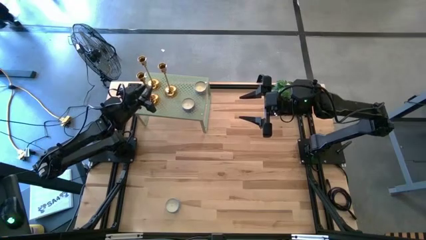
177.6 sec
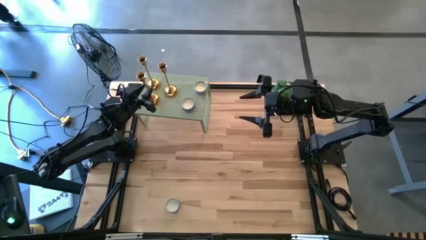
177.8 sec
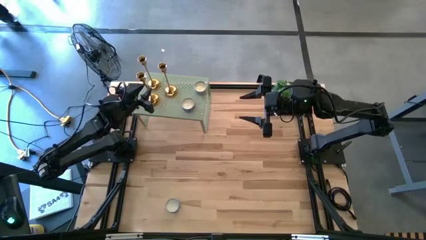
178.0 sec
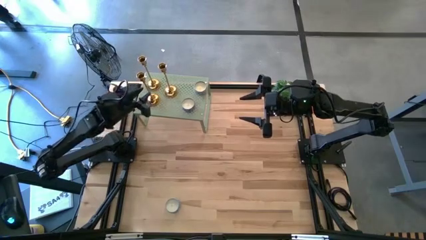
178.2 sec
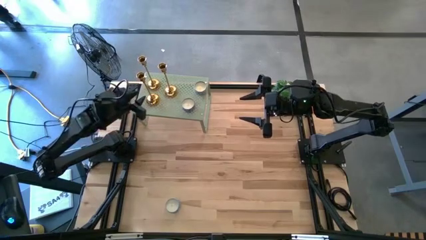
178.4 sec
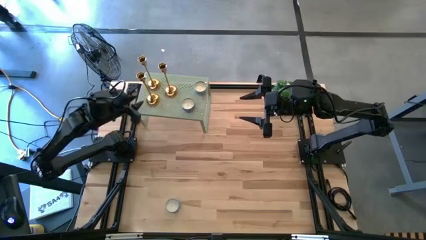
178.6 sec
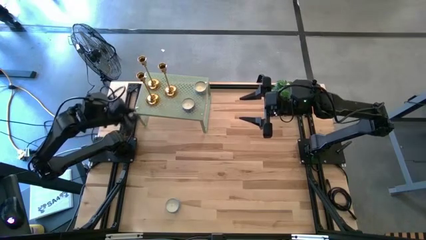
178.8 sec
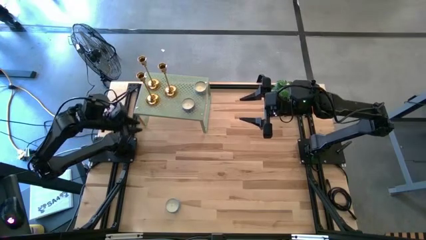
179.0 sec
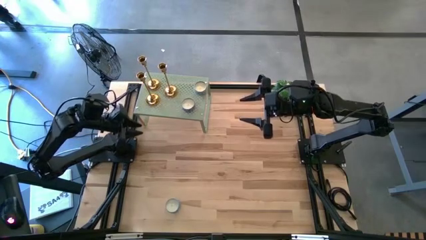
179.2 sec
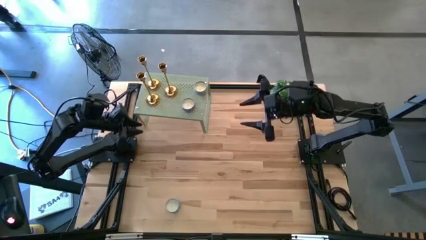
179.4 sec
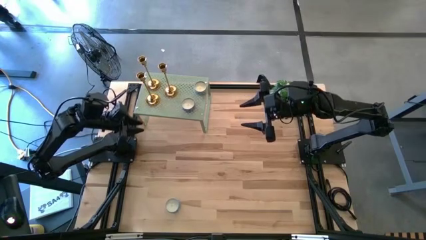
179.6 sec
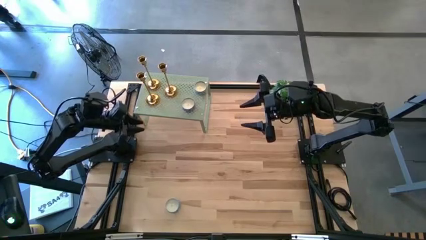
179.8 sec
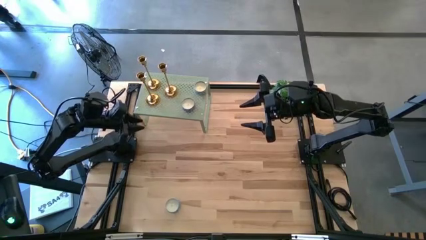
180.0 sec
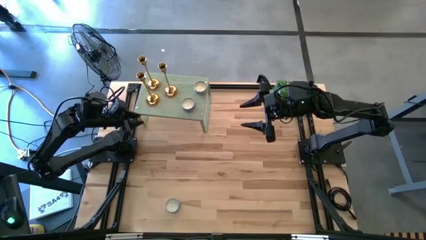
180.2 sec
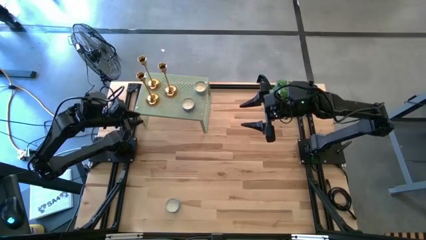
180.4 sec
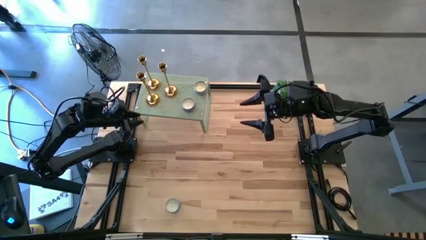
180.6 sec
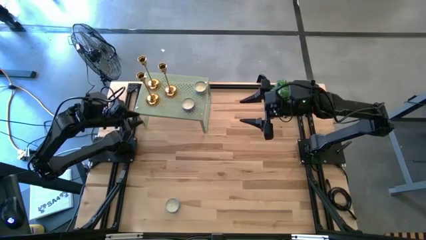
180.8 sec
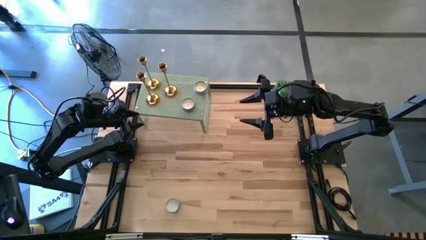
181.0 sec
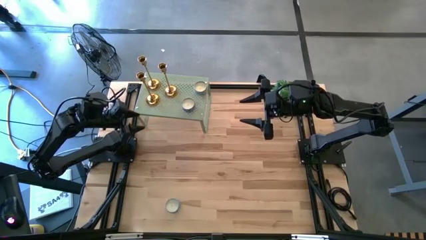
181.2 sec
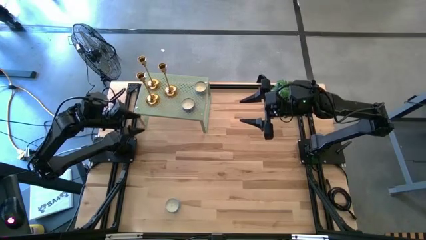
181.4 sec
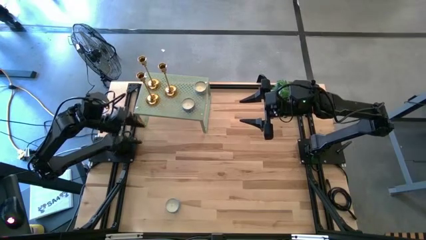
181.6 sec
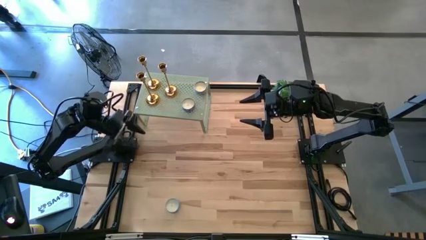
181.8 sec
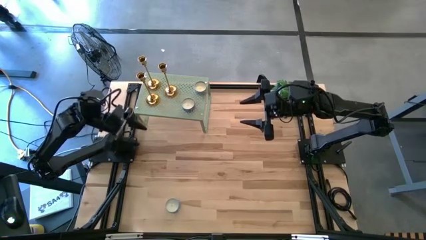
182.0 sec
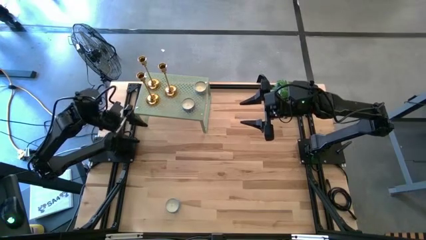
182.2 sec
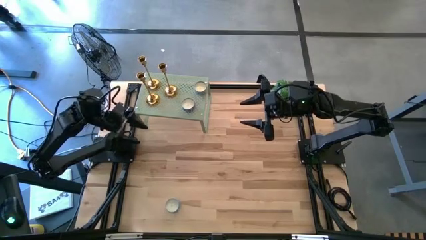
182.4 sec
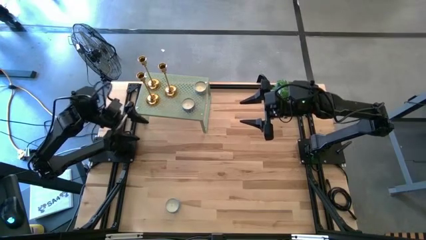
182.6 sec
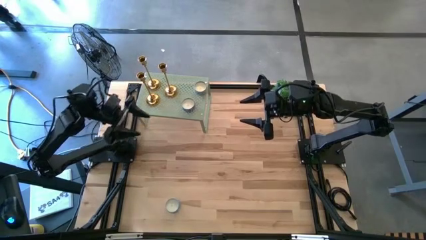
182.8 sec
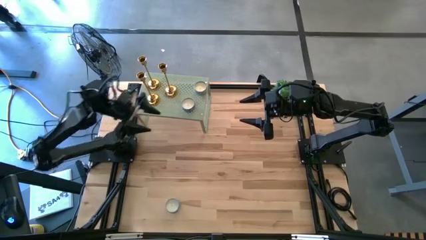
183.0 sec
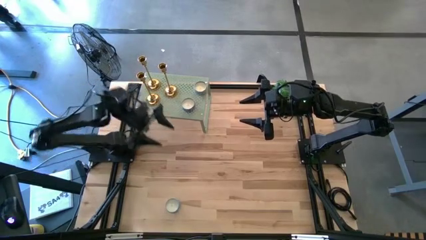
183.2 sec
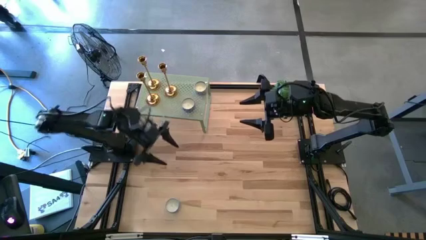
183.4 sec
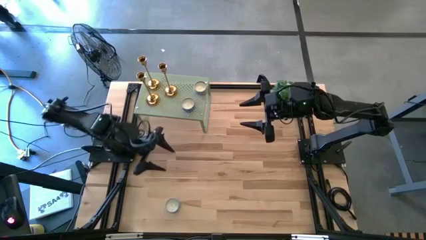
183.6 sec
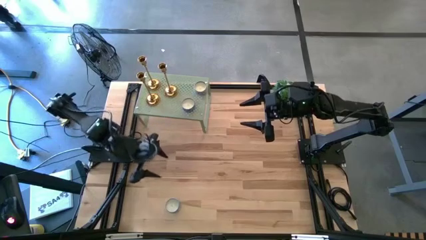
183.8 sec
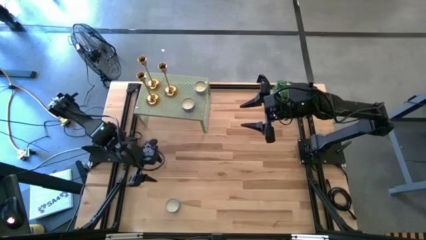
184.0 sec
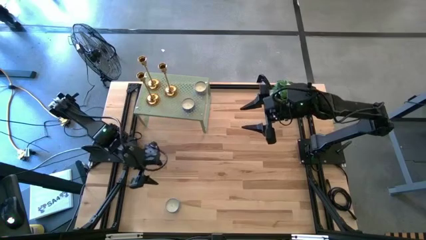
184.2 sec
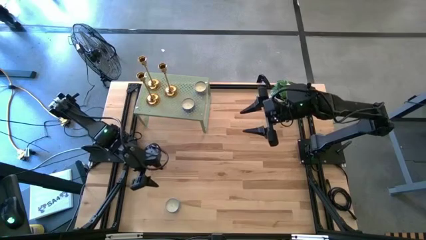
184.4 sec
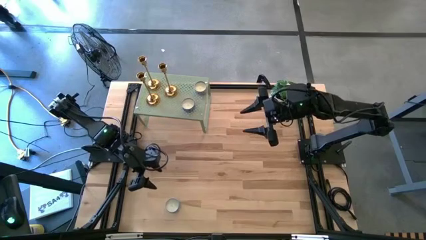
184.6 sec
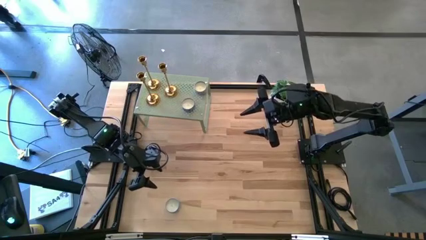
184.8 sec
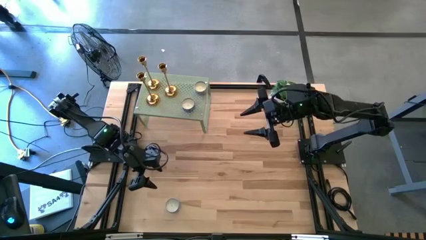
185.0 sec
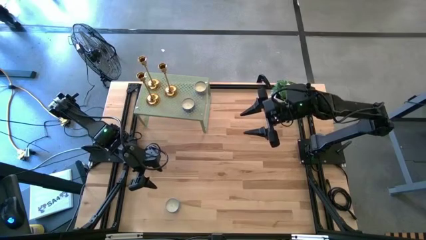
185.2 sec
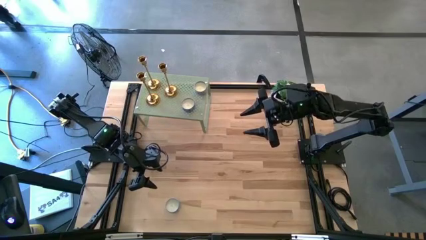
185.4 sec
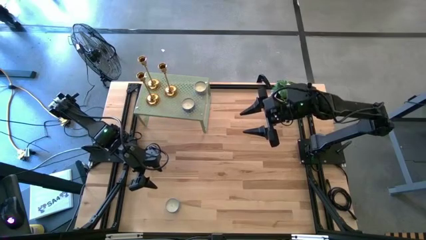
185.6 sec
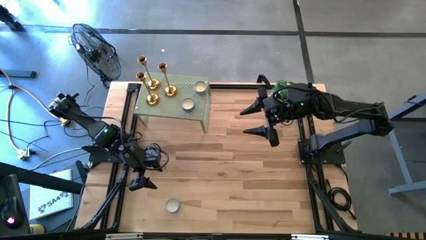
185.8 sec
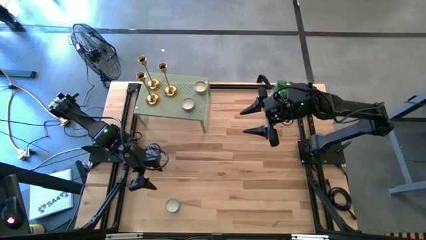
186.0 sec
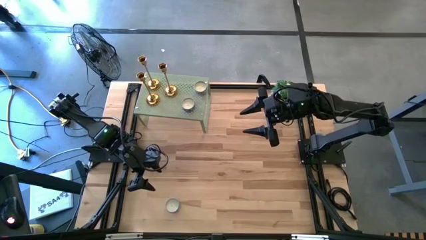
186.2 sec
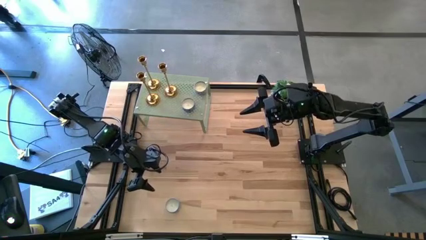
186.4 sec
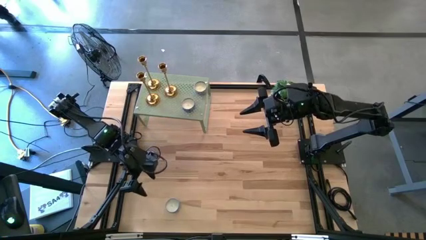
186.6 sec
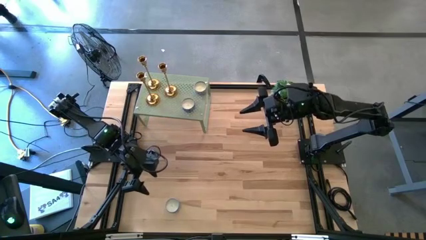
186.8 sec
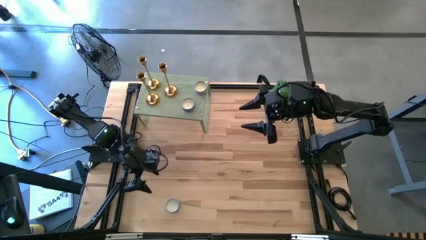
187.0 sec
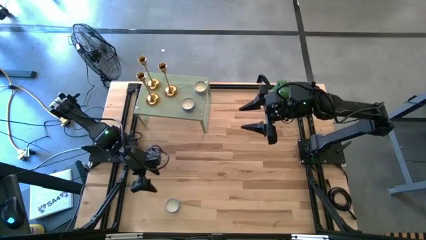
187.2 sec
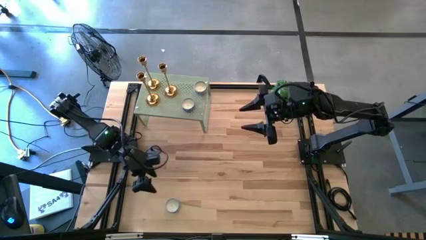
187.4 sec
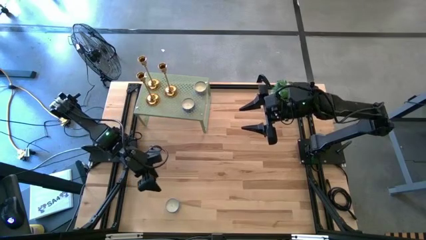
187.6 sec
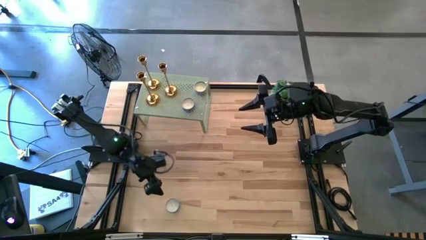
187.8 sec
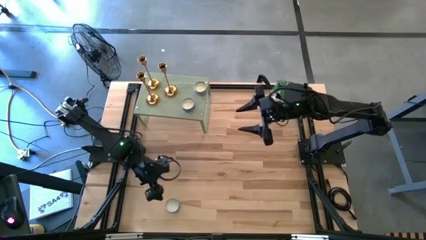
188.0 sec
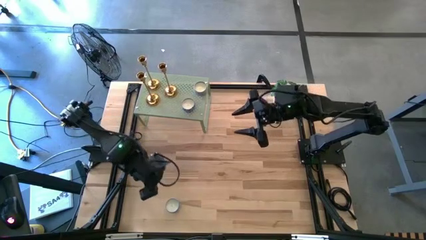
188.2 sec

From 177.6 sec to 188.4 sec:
Task: Pick & Place candle stick holders
Put the blue patterned round candle on the shelf

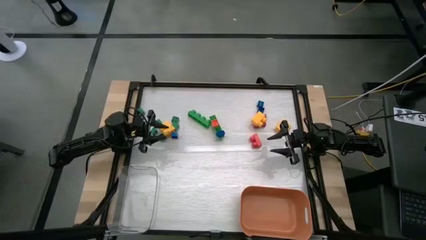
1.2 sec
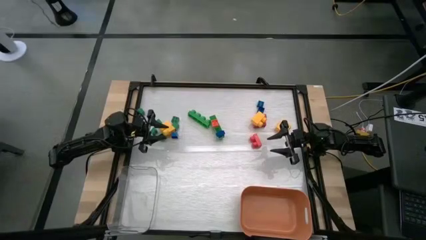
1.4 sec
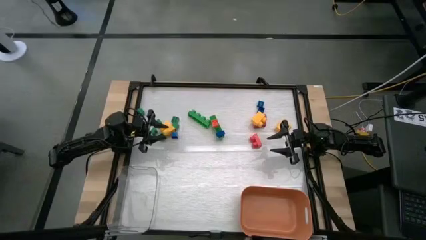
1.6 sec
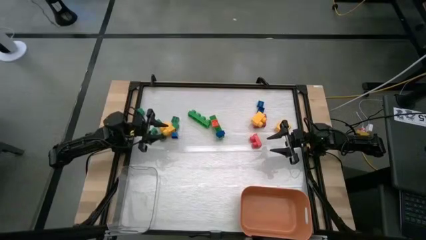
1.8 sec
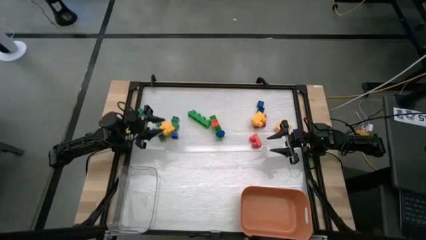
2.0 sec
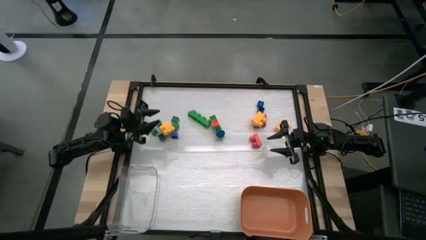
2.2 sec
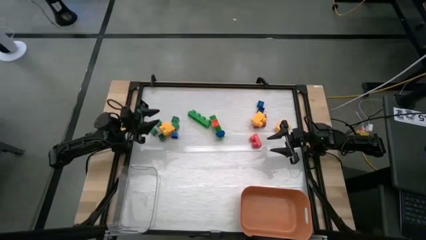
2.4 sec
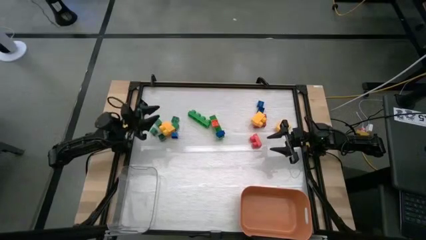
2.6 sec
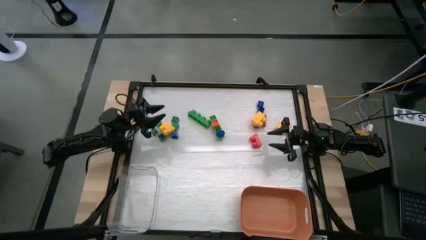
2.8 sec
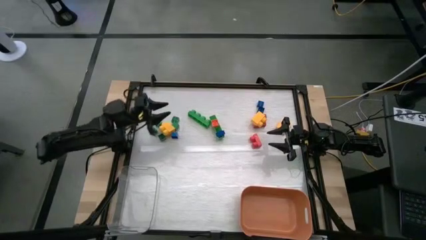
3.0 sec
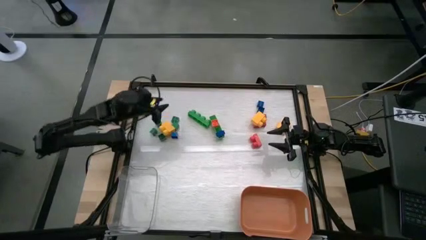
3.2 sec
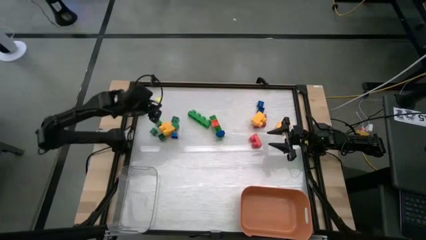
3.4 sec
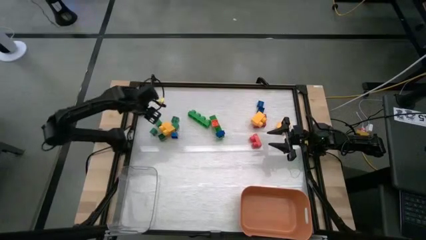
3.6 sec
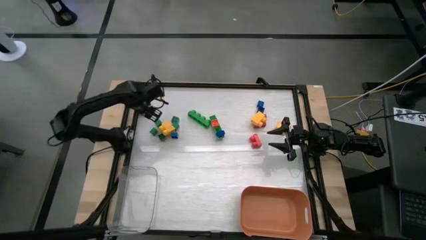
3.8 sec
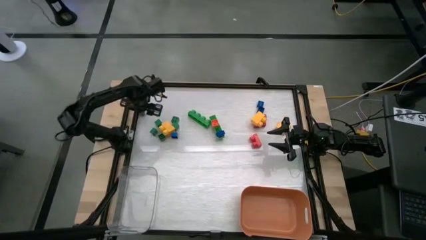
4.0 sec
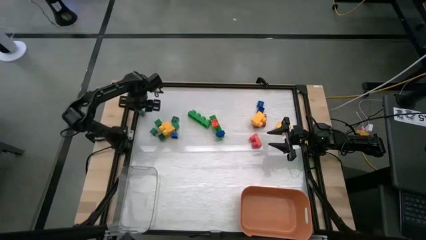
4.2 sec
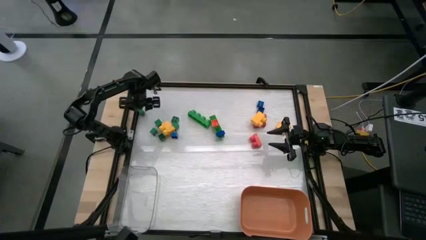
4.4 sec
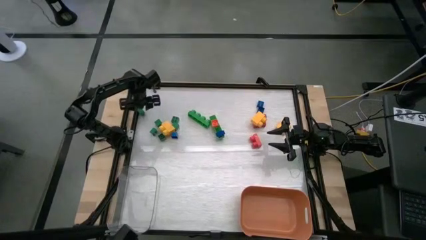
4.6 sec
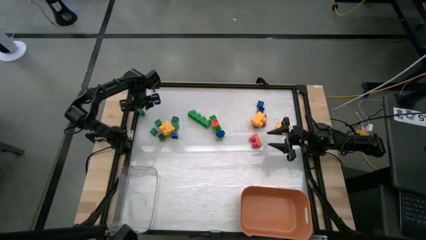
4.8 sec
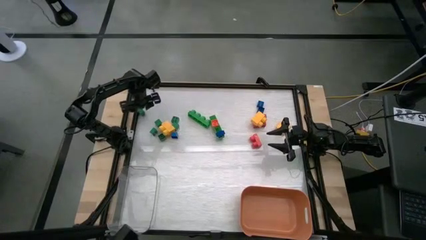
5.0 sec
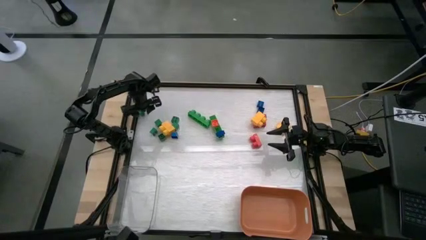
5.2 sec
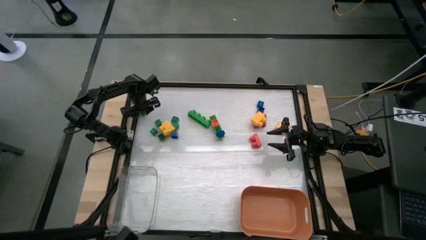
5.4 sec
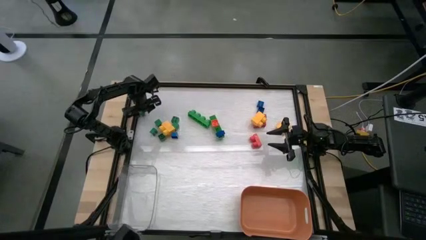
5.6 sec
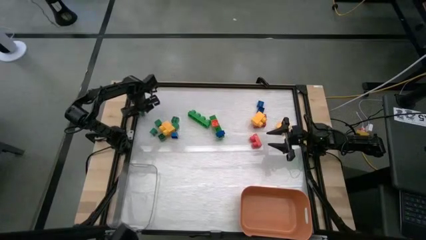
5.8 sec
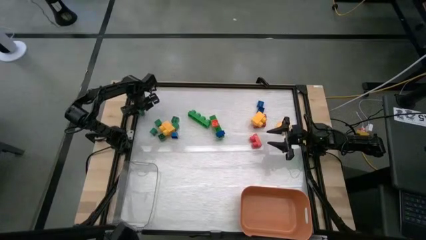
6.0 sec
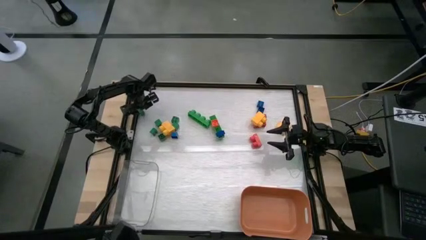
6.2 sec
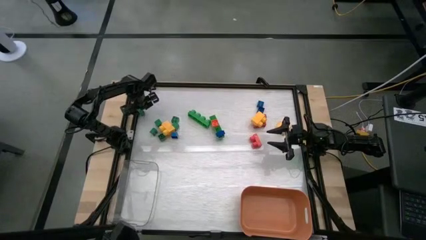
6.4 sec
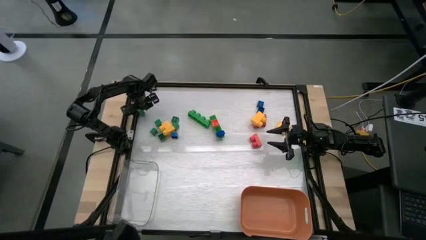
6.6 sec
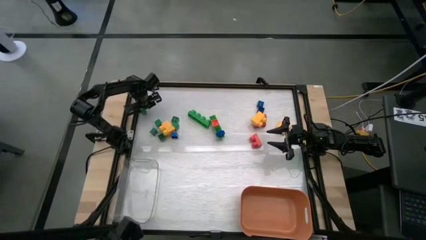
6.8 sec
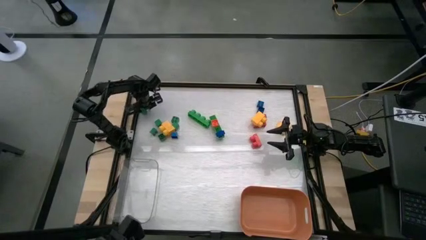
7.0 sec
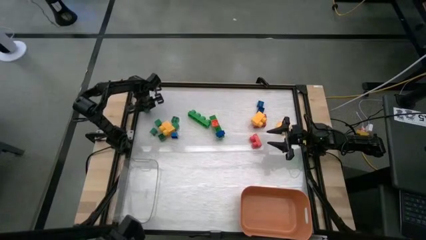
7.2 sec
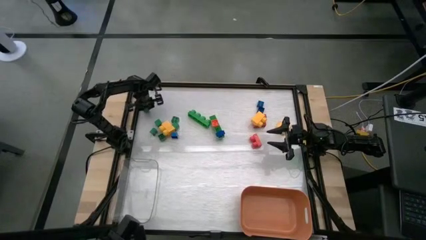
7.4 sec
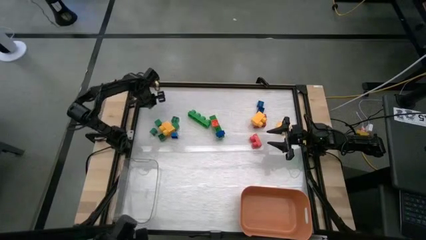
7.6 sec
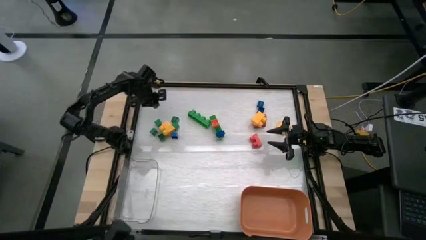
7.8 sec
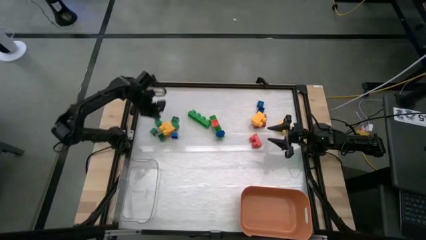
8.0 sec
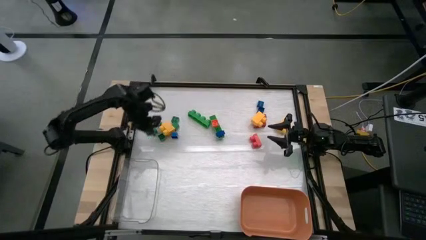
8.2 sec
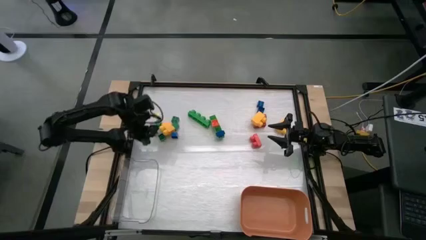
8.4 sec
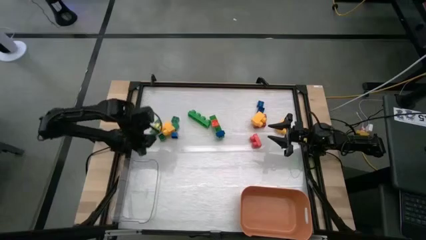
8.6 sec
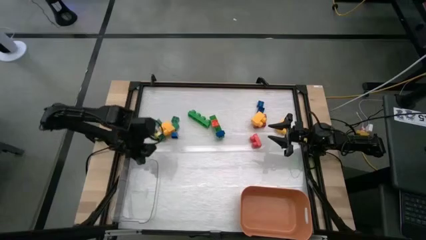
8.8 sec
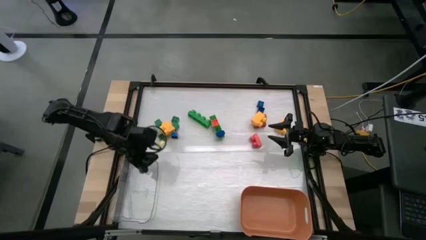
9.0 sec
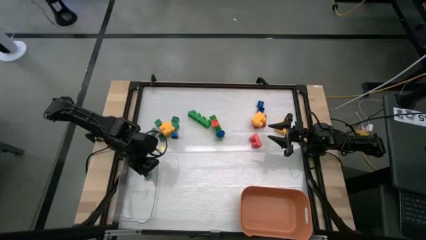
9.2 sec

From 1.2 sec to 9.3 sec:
Task: Sort blocks by size
Put the small green game piece into the transparent bin
